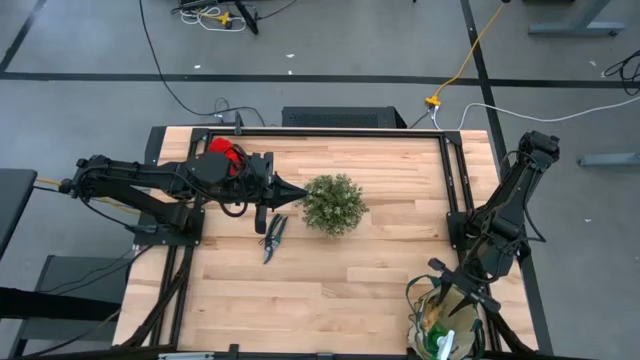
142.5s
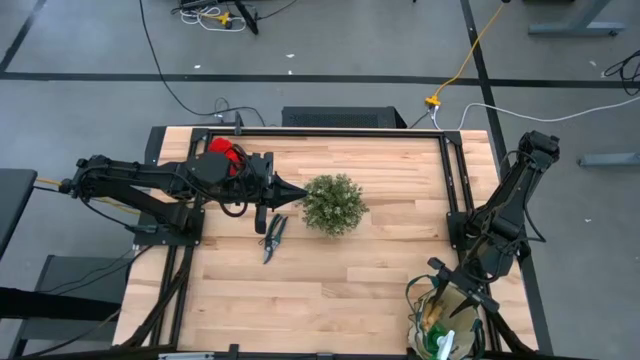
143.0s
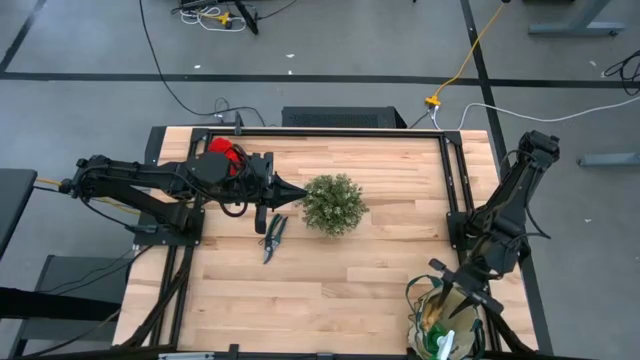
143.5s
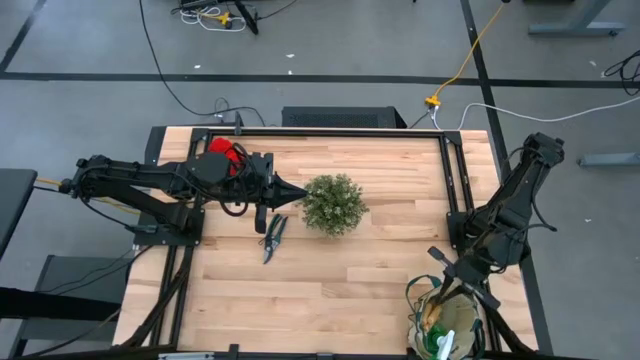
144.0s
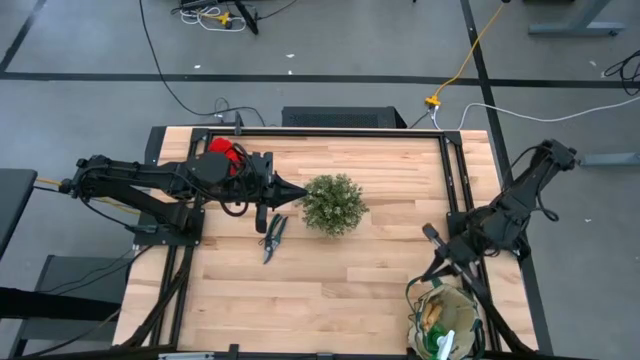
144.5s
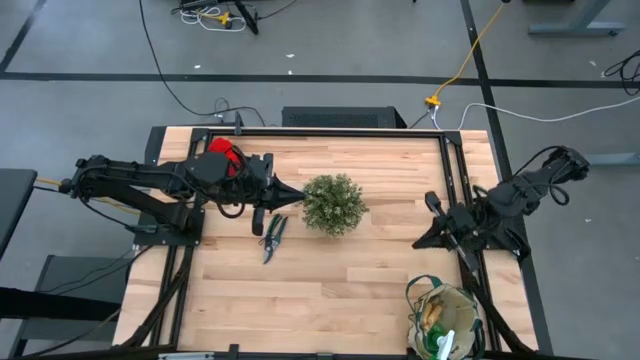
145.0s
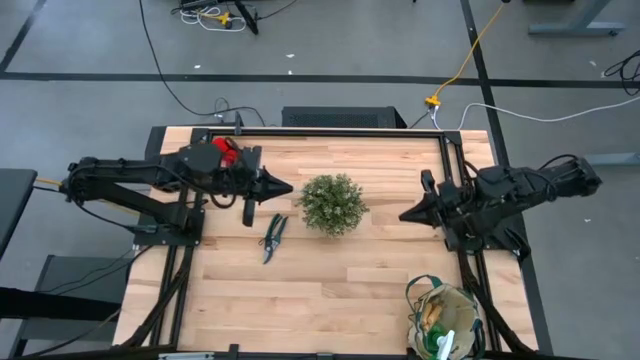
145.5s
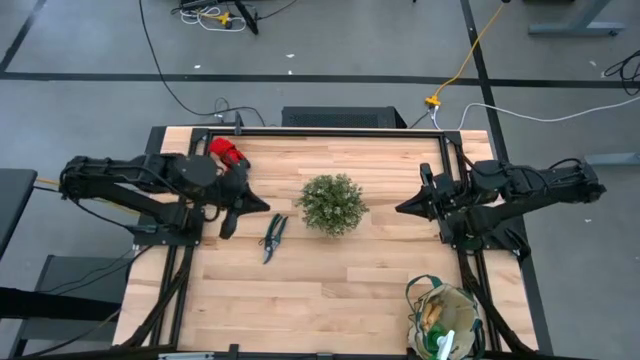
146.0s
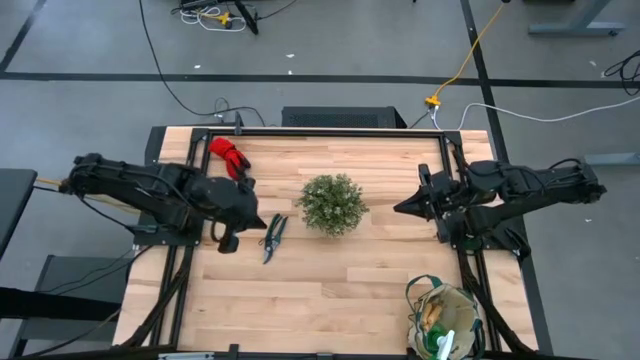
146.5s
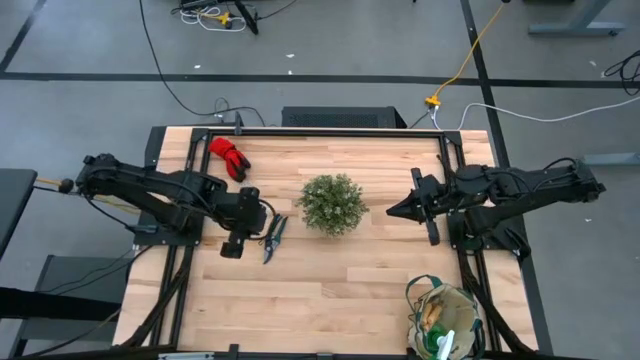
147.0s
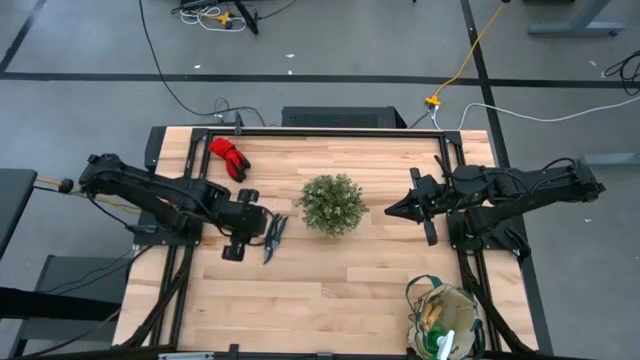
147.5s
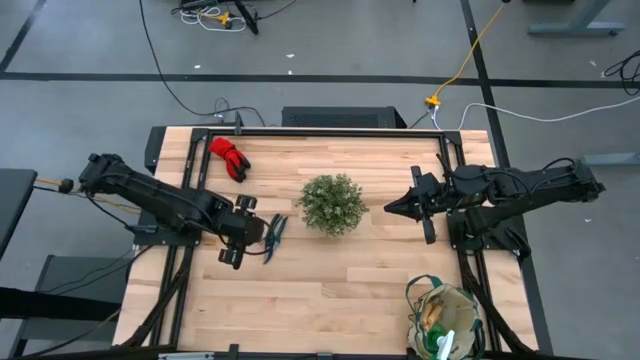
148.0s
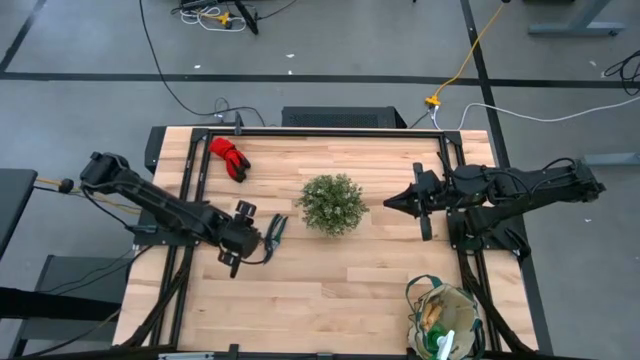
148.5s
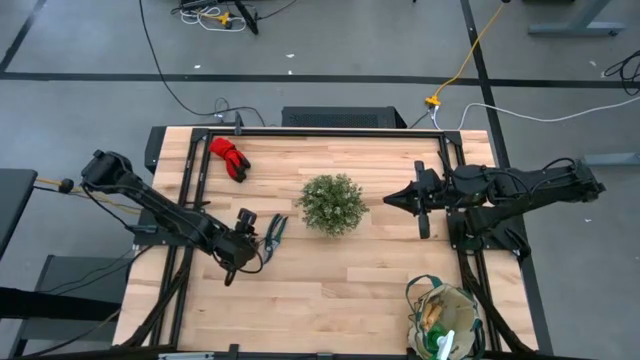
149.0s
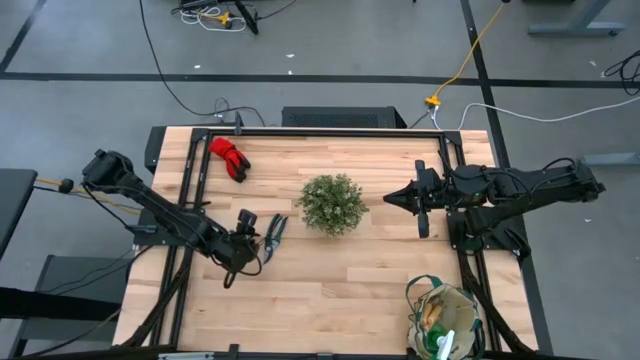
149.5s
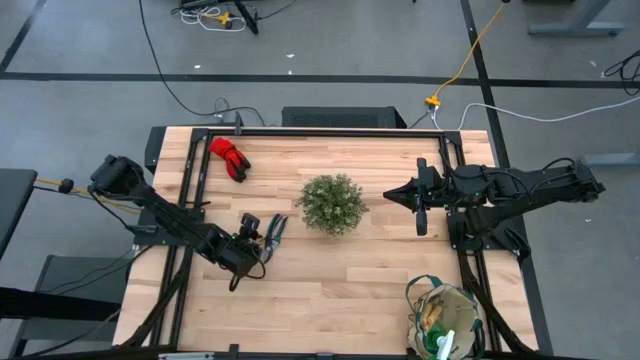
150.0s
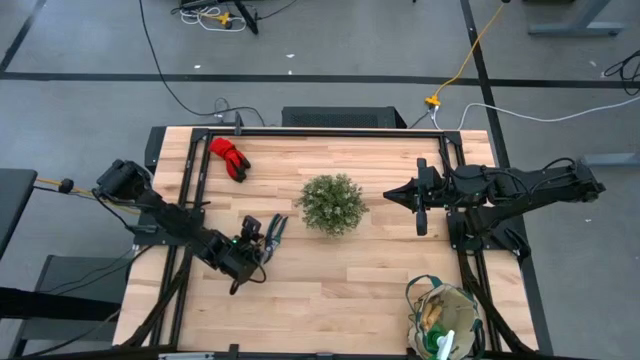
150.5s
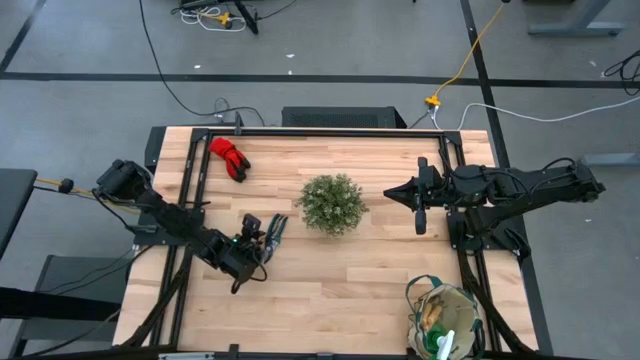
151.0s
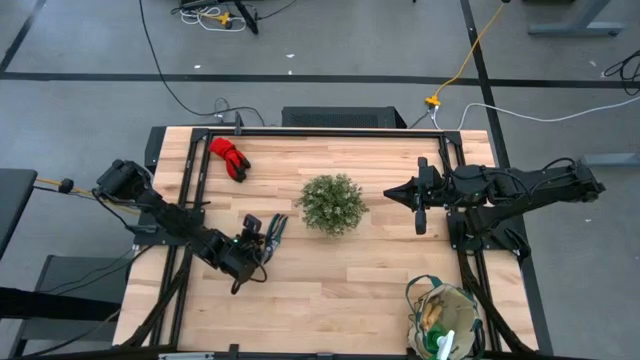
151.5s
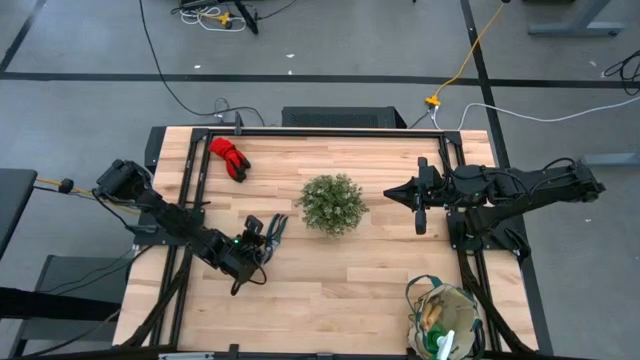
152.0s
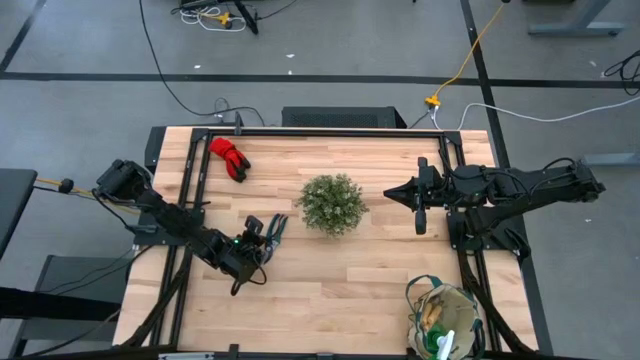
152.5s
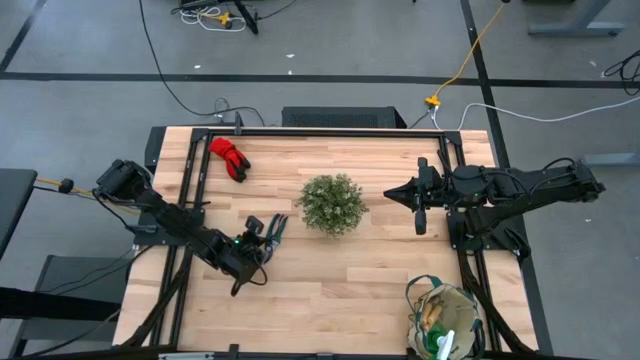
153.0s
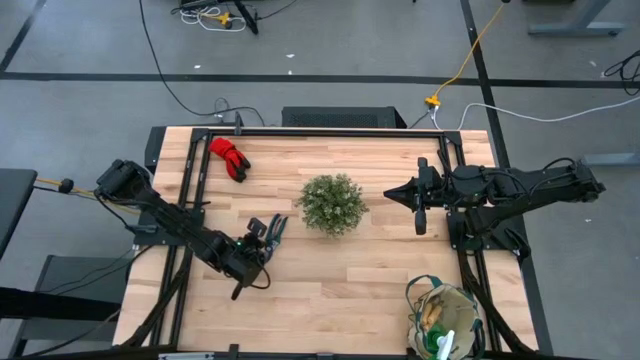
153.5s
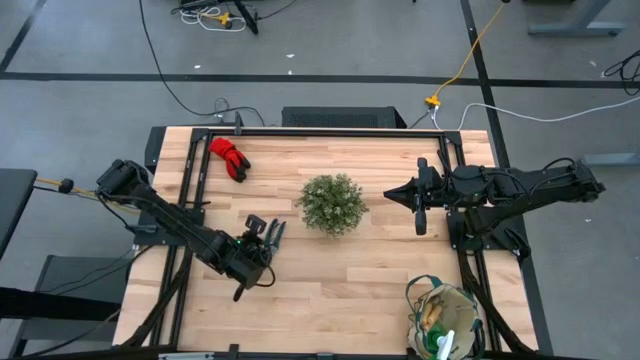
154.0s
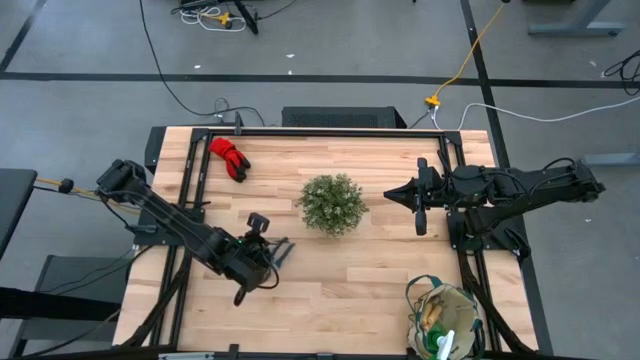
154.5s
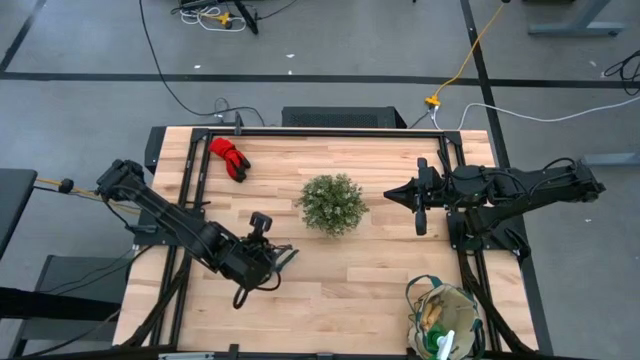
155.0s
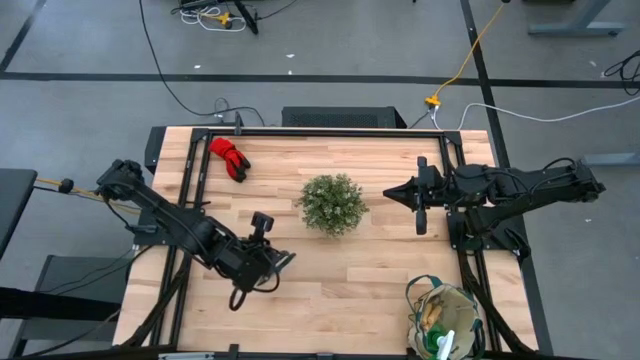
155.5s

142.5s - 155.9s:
Task: Pick & Place Garden tools in Gardening bag
Put the green shear scissors into the white gardening bag

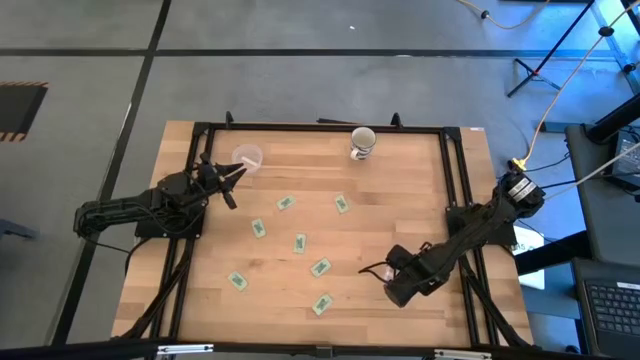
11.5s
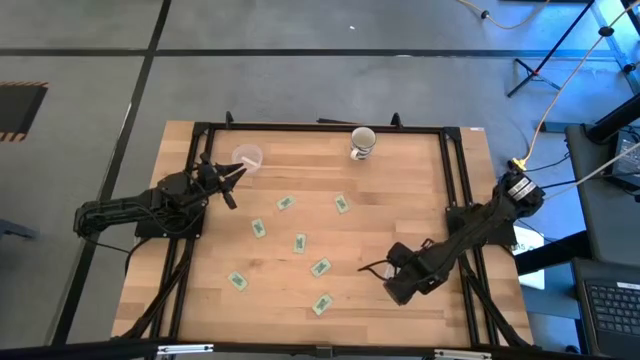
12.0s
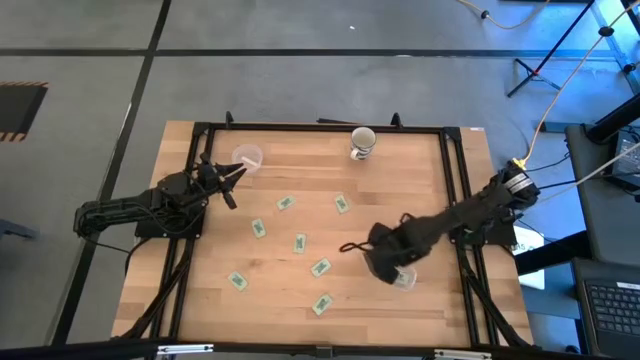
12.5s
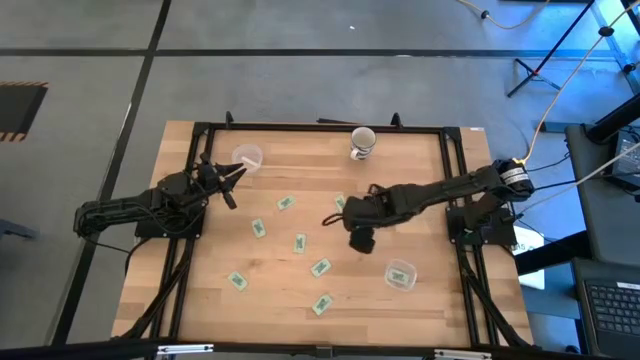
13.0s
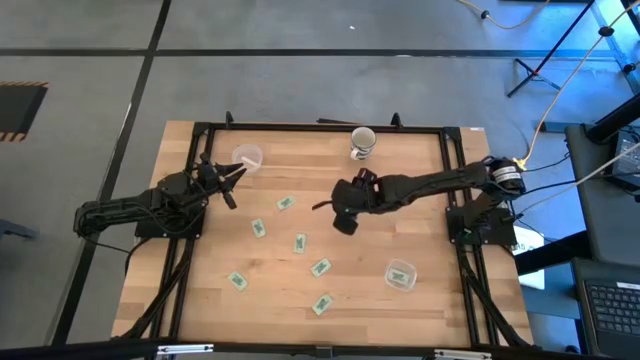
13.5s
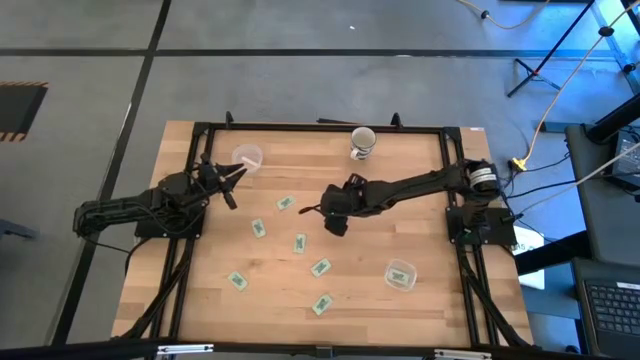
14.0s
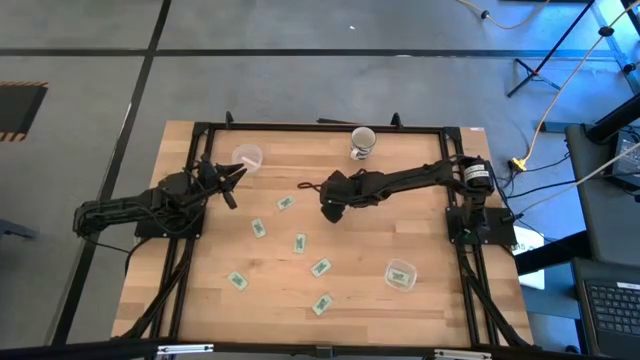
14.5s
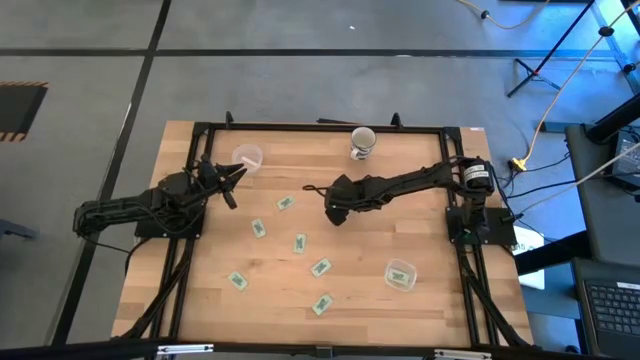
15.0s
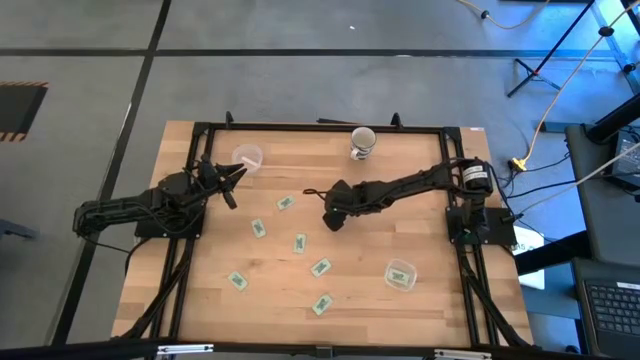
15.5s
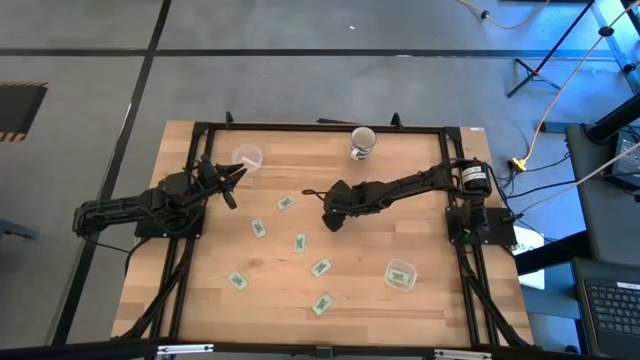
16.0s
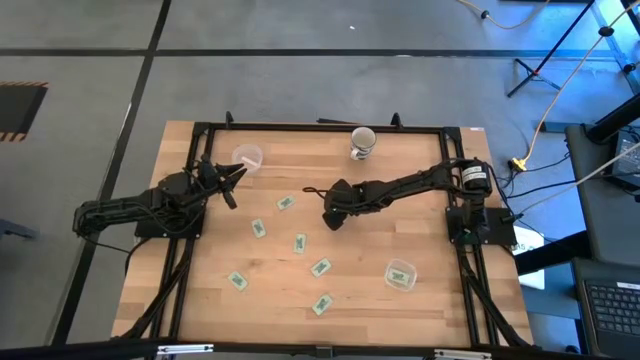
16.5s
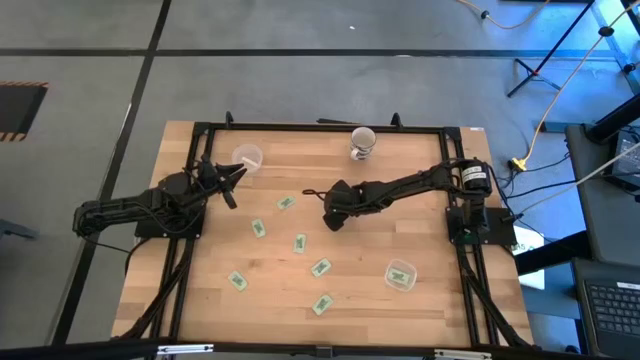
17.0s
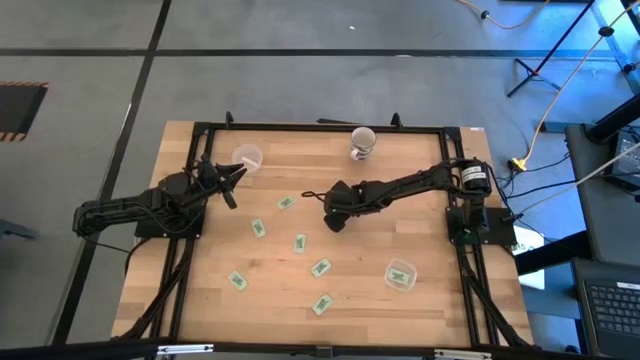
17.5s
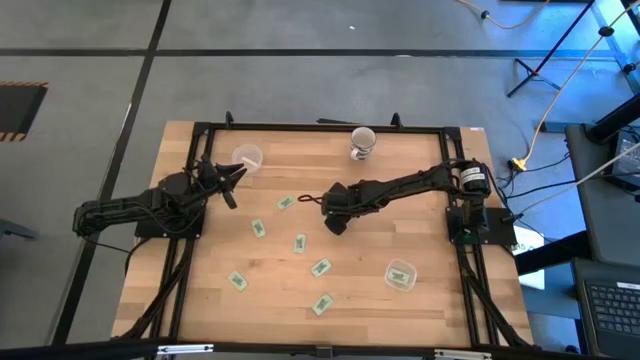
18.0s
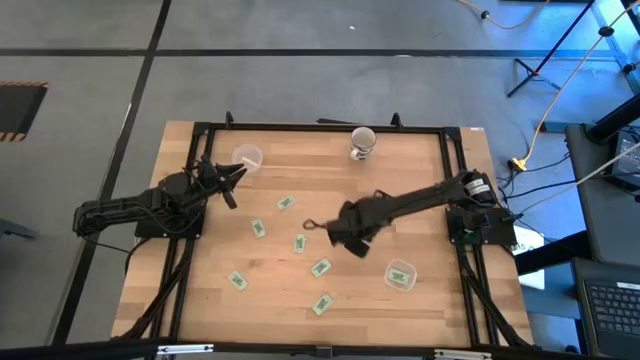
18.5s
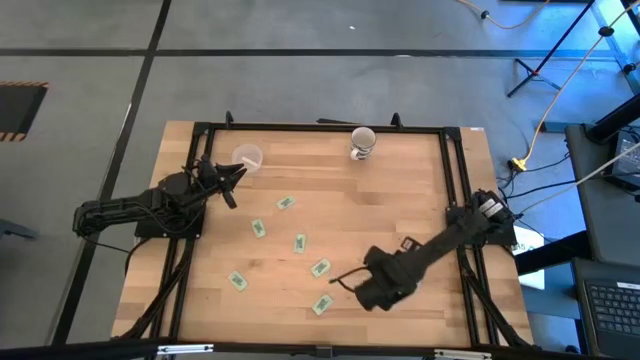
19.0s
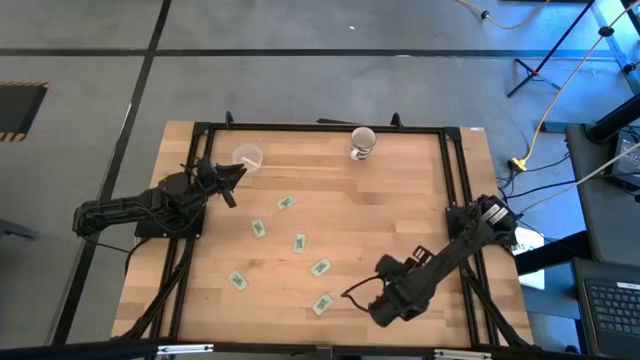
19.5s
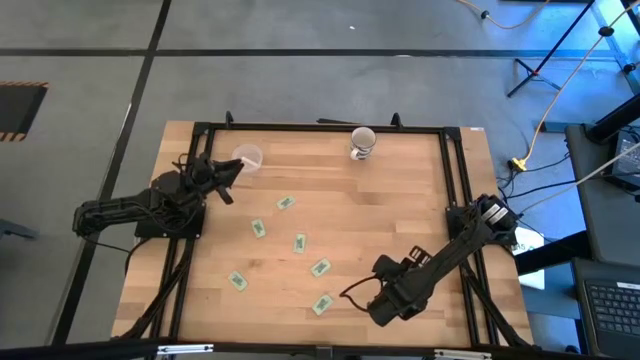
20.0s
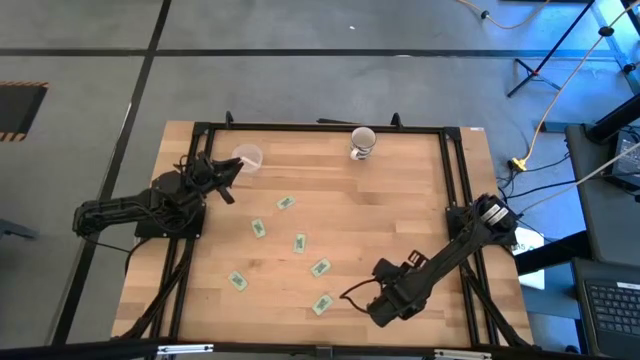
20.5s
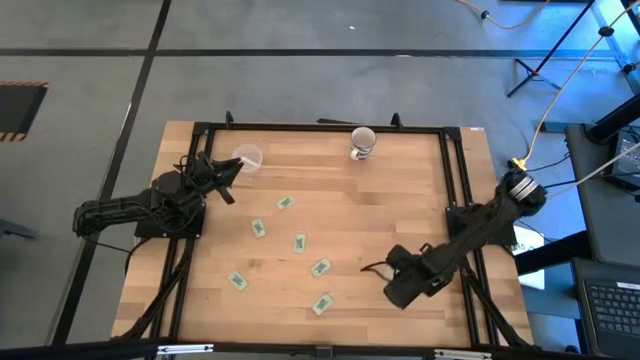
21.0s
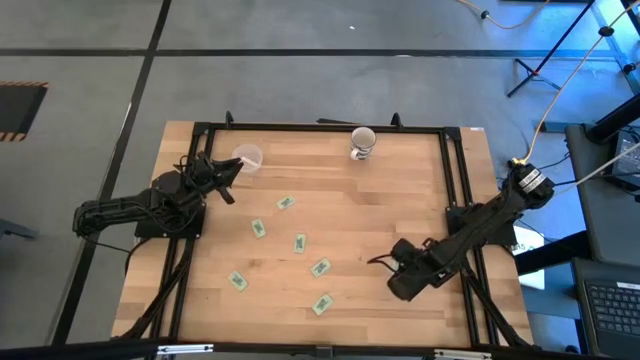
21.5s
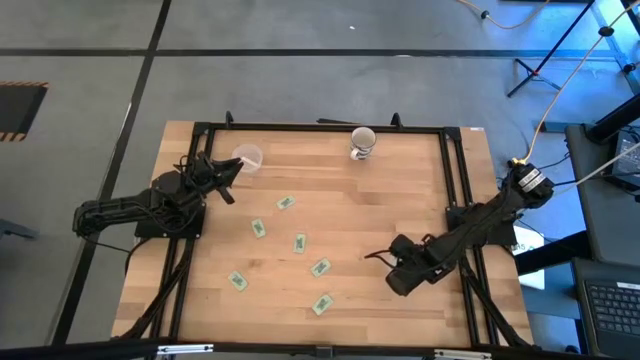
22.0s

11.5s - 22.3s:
Task: Pick and place items into bin
Put the white stevia packet into the bottom transparent bin
